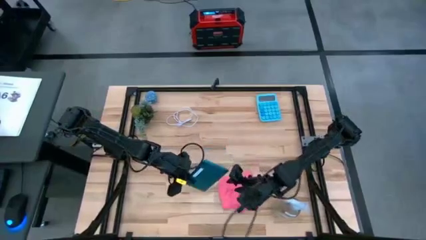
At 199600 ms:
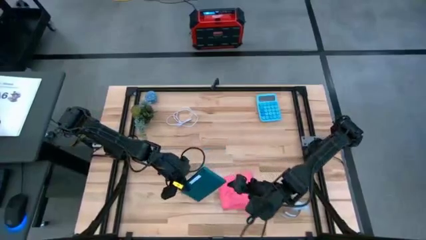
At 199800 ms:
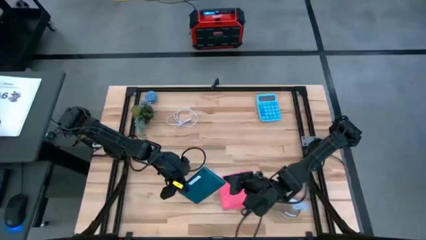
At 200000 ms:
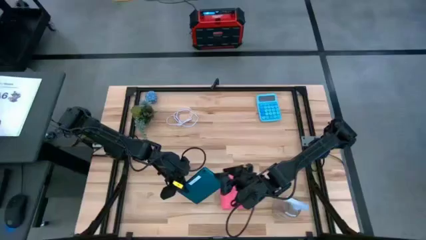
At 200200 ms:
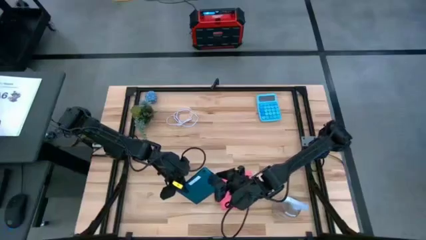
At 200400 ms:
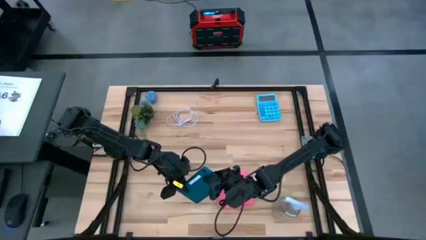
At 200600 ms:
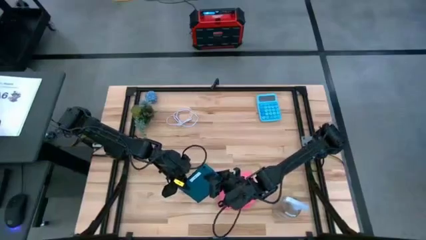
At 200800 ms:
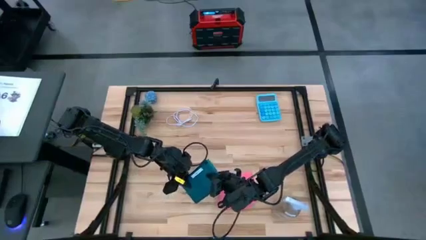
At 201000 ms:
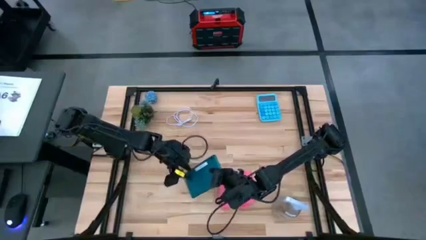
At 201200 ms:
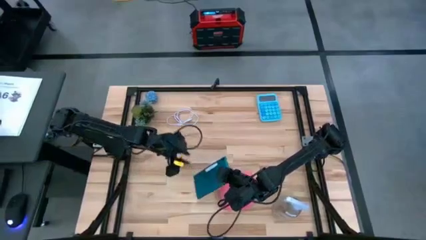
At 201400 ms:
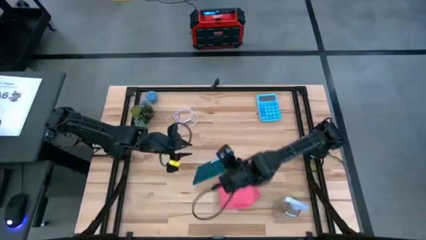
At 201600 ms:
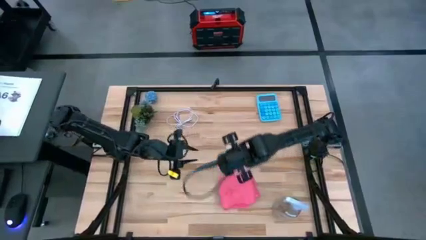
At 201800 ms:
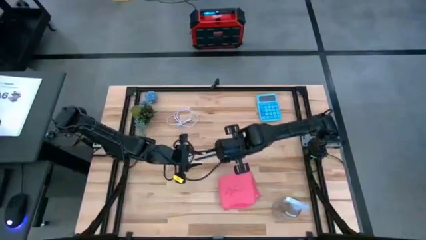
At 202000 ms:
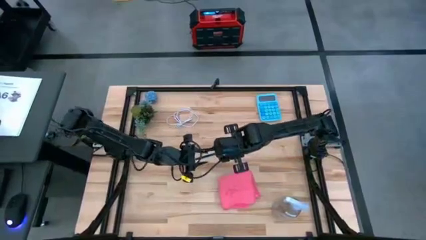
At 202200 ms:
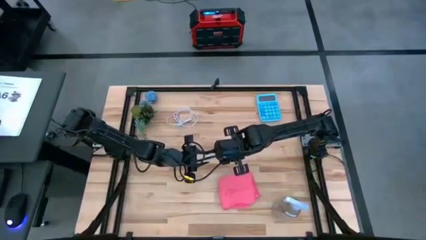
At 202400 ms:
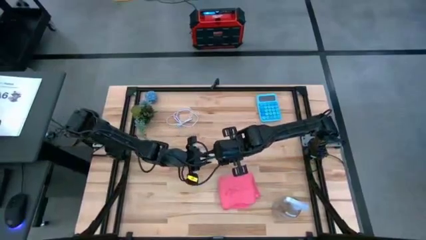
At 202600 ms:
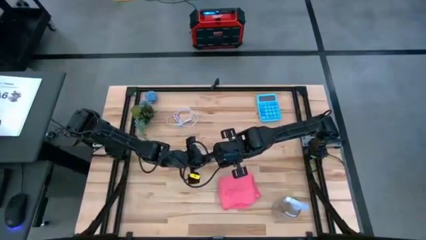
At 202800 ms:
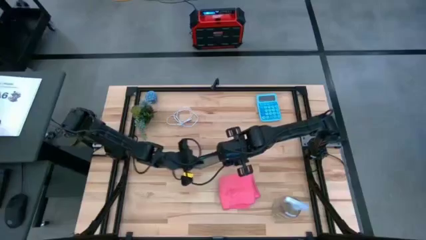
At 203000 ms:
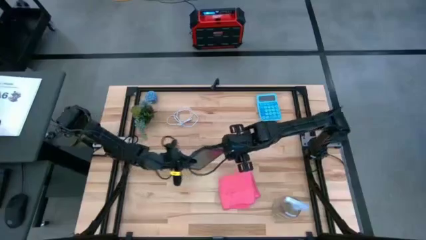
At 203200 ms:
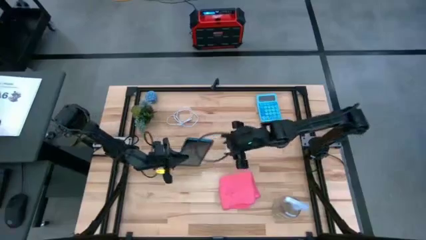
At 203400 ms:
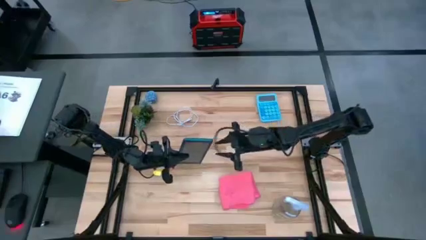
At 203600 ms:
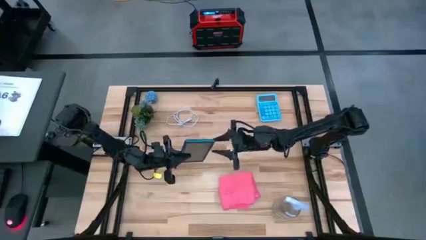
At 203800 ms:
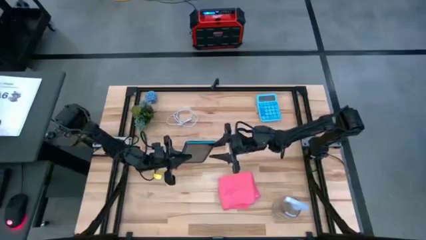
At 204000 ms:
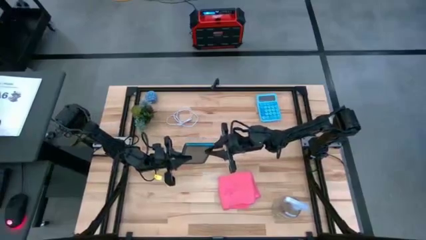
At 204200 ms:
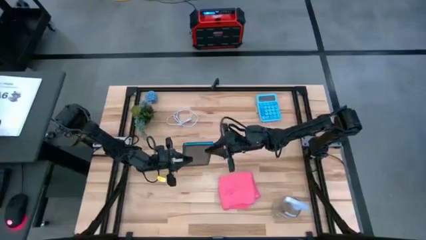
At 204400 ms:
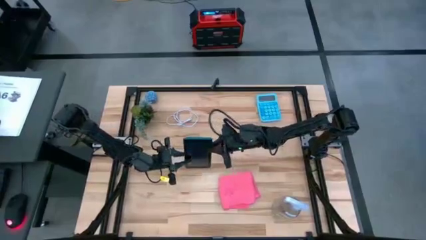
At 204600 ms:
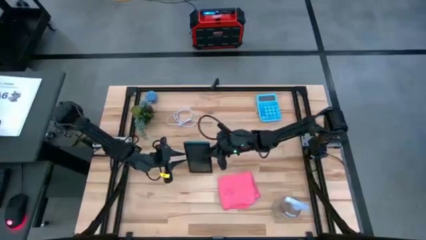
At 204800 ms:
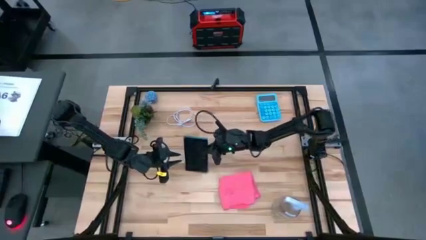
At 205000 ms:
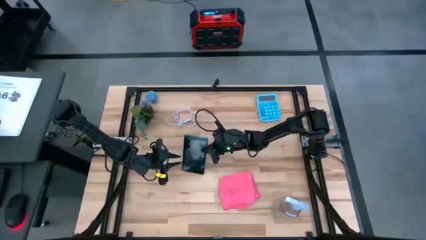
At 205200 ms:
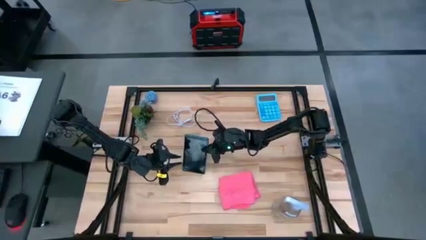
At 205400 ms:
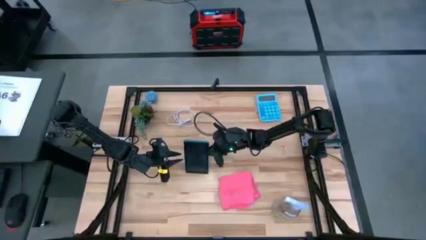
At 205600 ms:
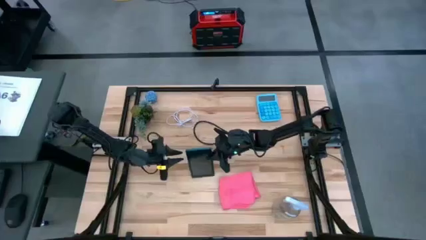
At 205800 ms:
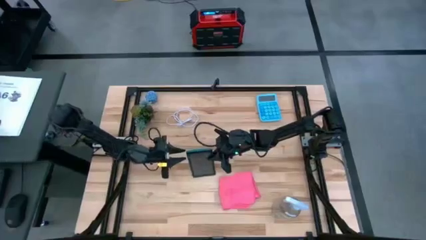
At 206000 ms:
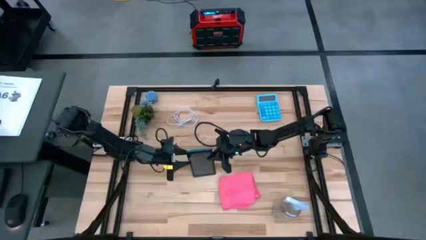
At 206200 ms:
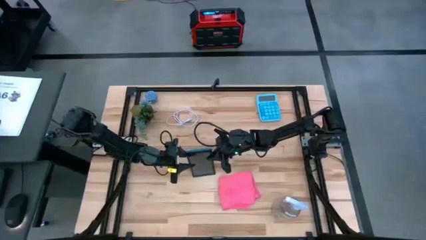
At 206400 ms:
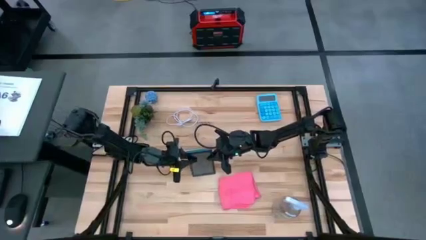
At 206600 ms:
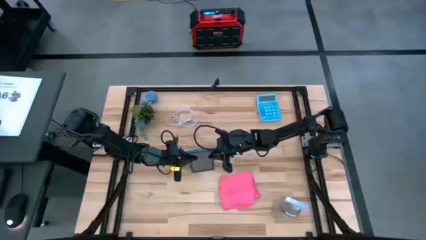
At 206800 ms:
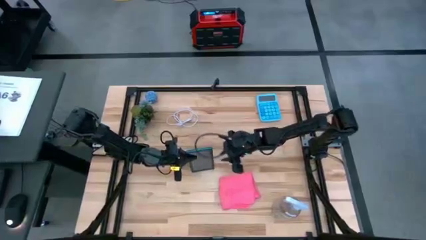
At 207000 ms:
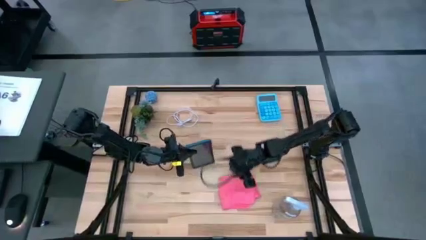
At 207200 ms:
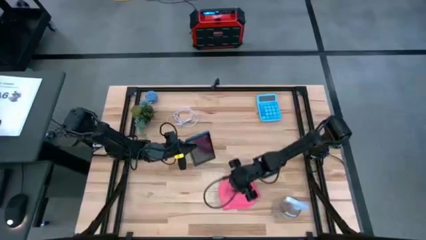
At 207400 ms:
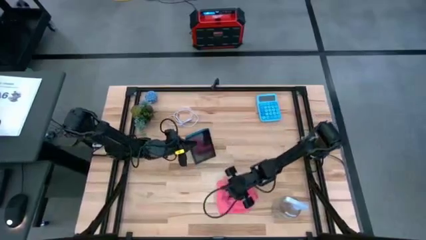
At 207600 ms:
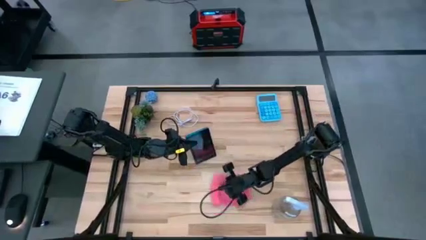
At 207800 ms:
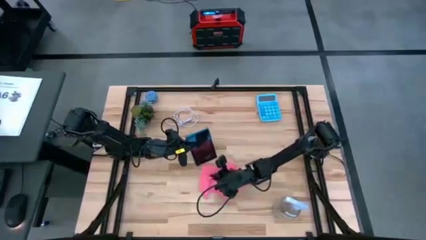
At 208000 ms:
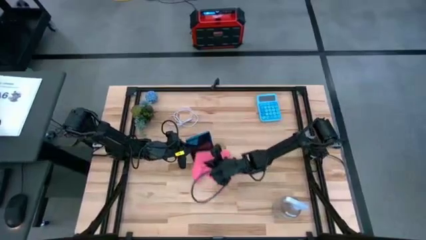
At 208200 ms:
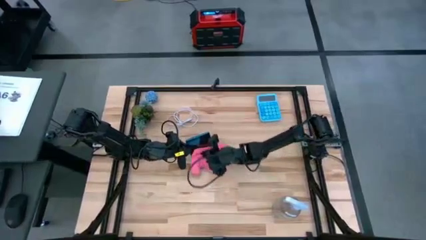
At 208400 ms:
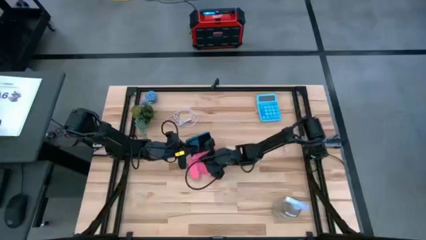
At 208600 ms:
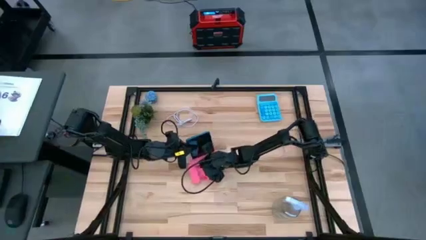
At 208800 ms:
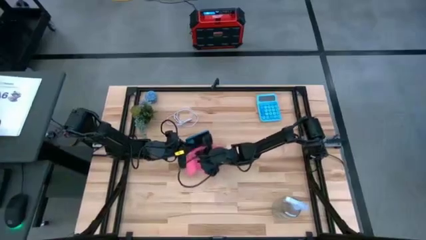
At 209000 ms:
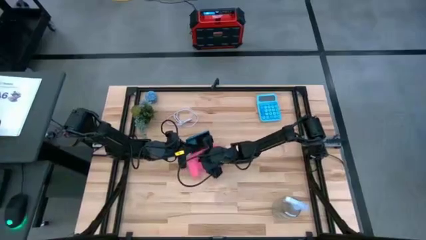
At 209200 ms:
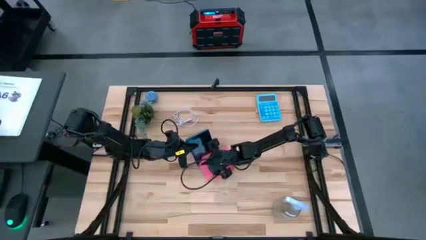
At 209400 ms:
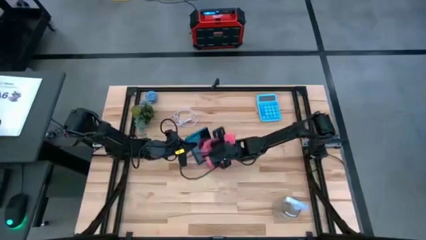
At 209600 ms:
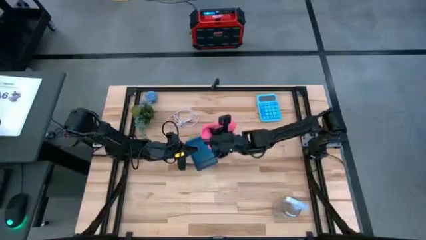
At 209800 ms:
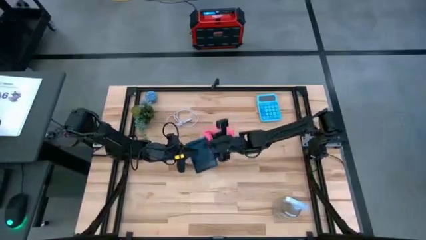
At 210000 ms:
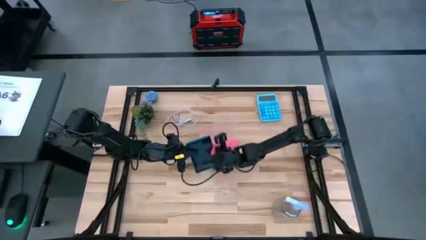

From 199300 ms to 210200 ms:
Task: Apply microfiber cloth
Wipe the front of the cellphone with the pink microfiber cloth
